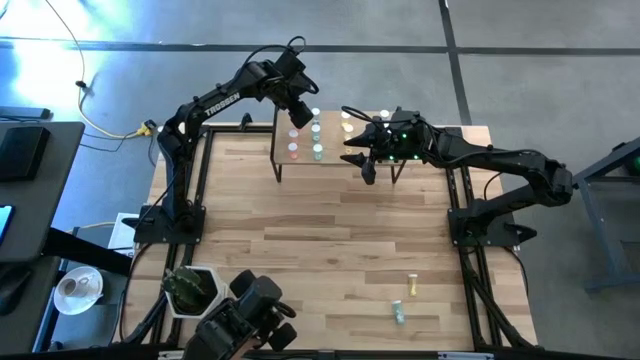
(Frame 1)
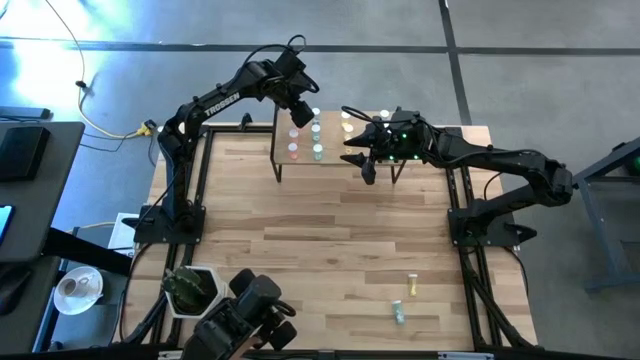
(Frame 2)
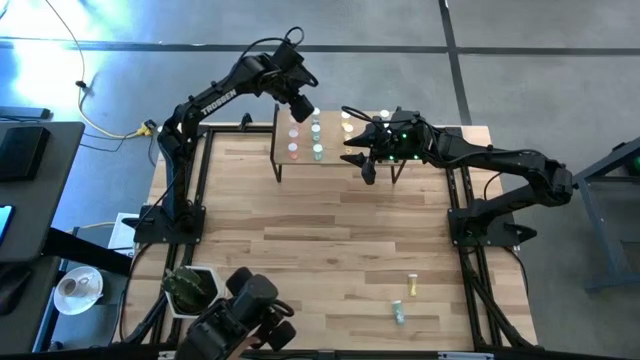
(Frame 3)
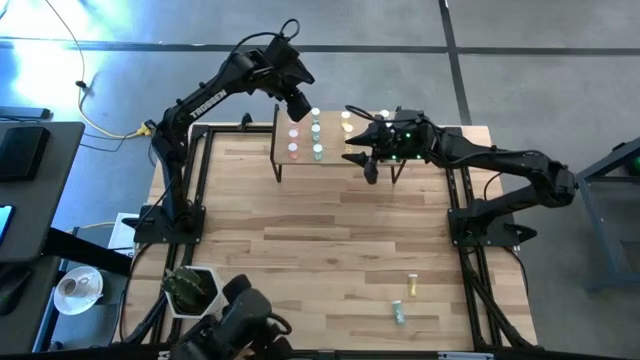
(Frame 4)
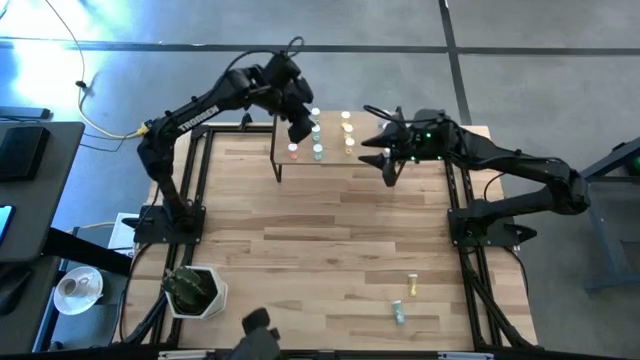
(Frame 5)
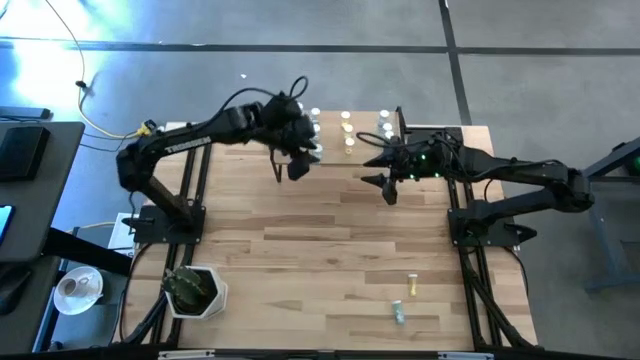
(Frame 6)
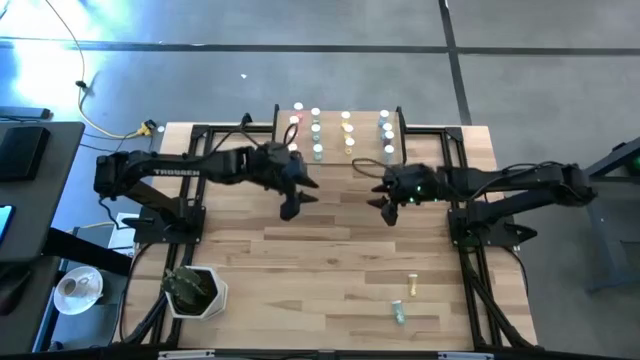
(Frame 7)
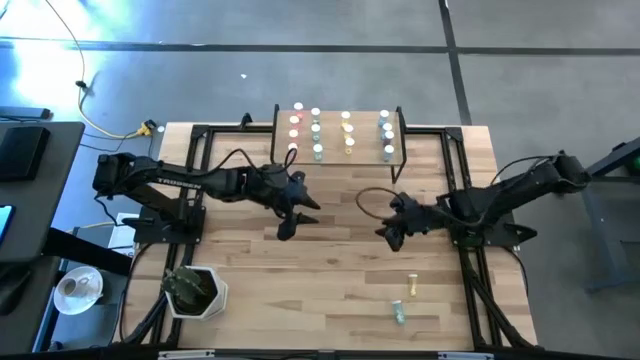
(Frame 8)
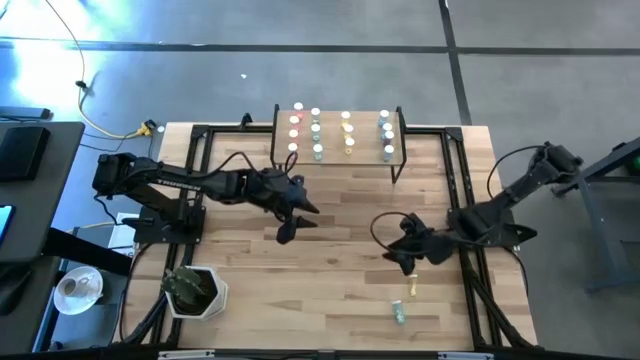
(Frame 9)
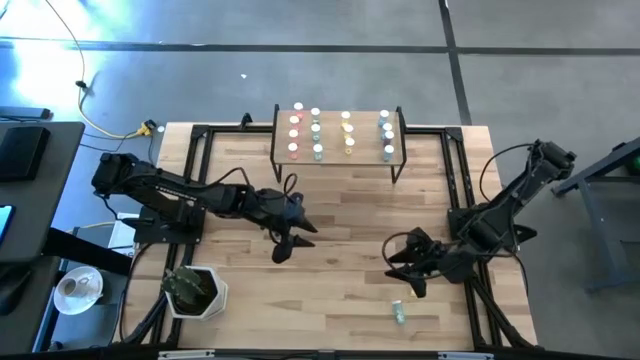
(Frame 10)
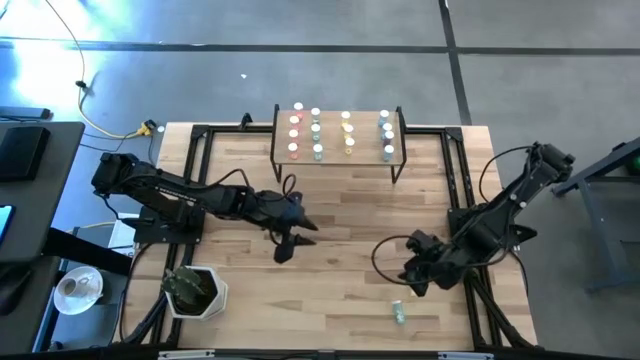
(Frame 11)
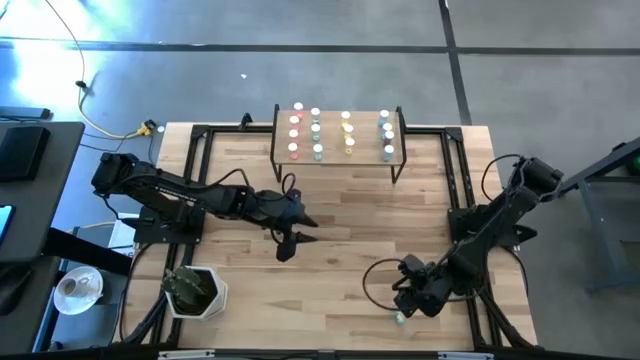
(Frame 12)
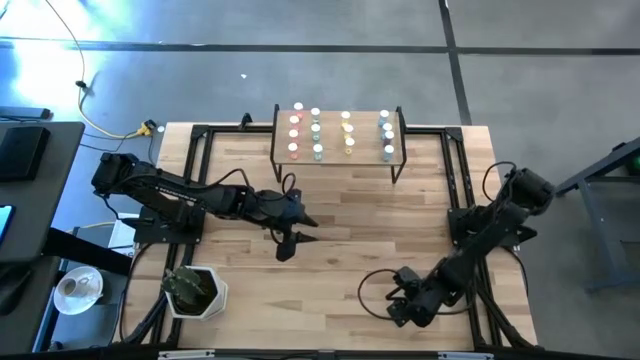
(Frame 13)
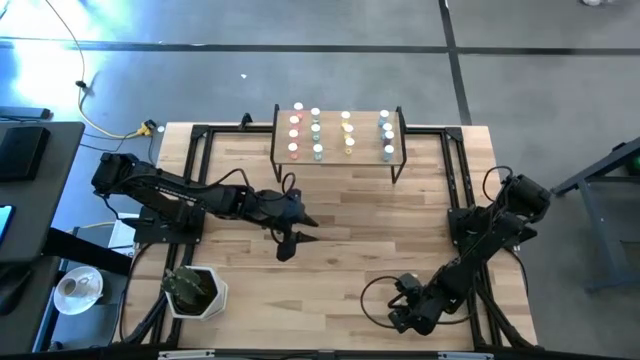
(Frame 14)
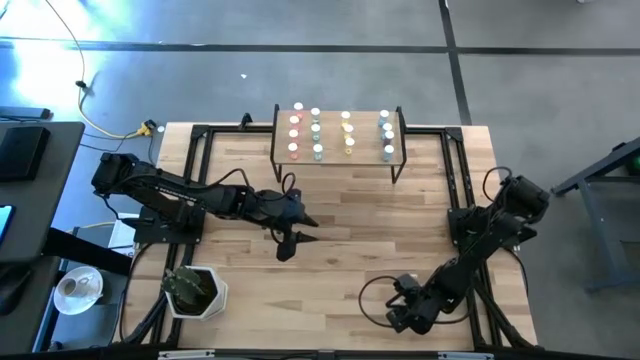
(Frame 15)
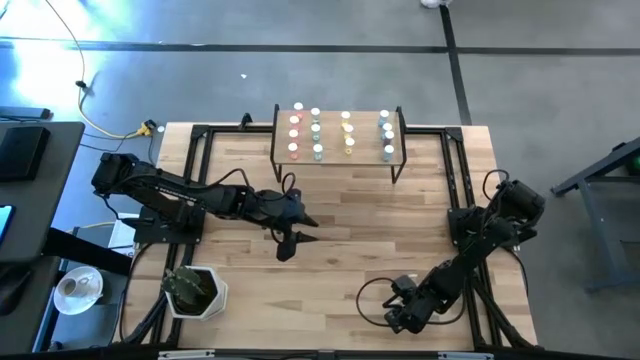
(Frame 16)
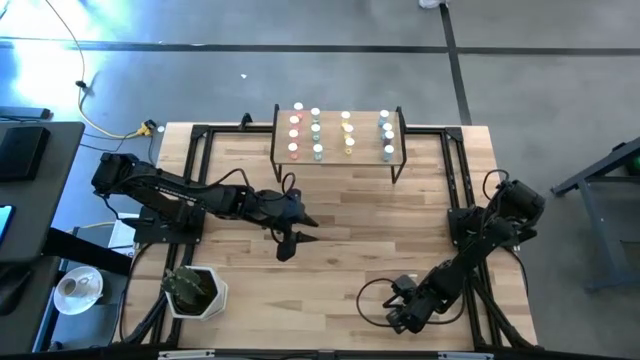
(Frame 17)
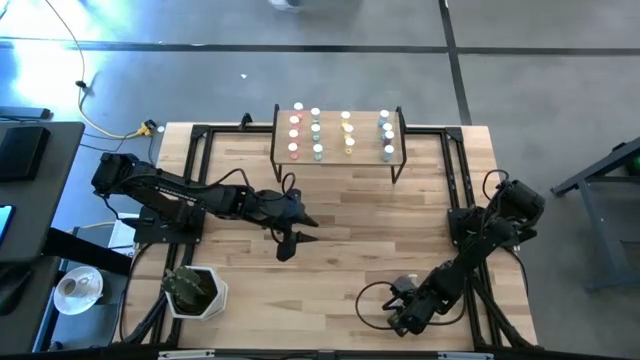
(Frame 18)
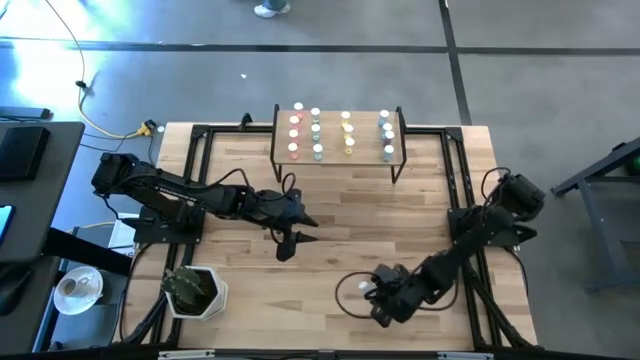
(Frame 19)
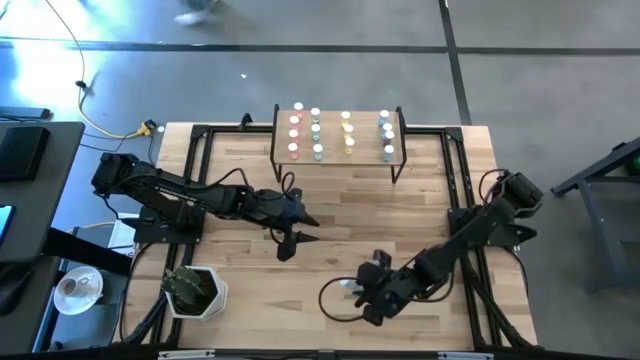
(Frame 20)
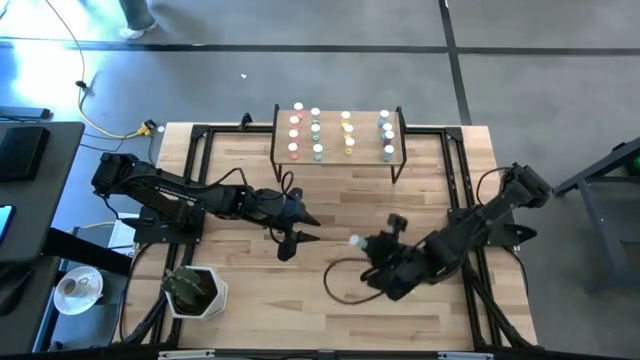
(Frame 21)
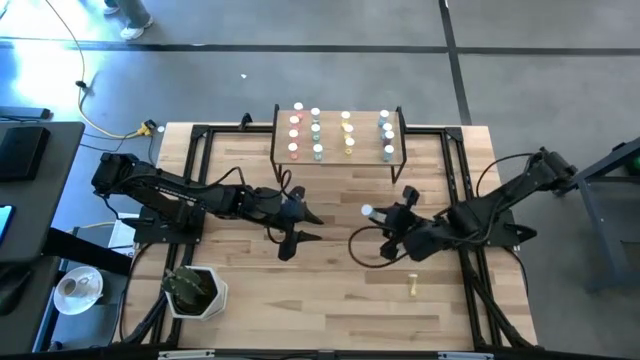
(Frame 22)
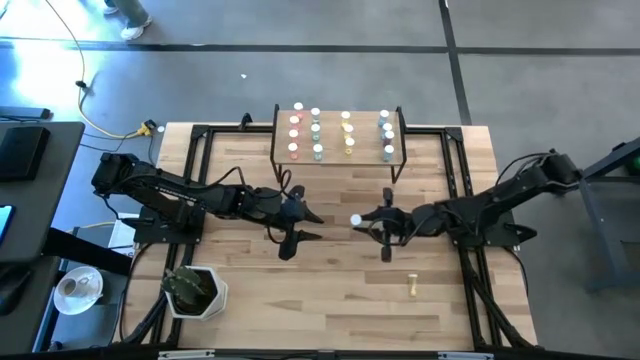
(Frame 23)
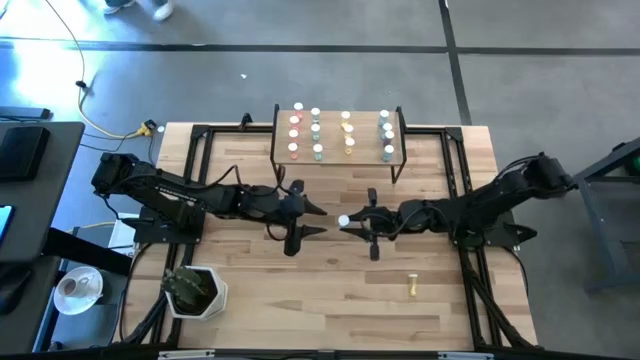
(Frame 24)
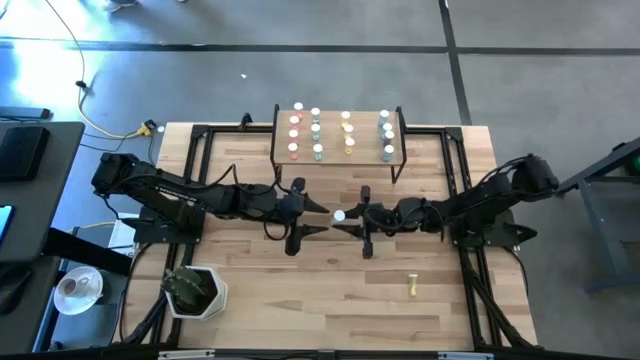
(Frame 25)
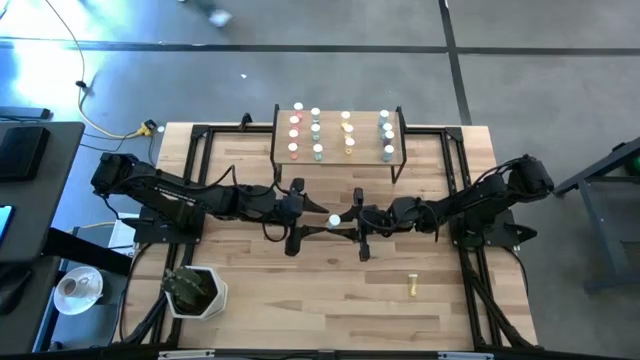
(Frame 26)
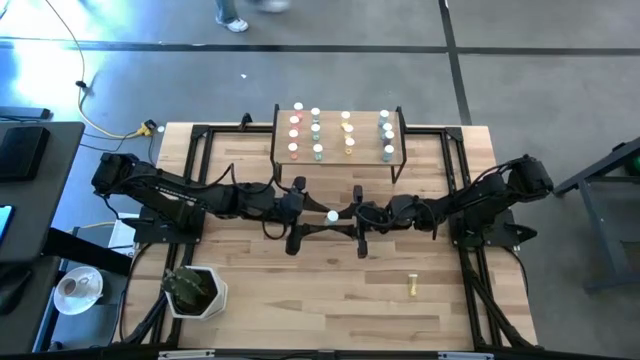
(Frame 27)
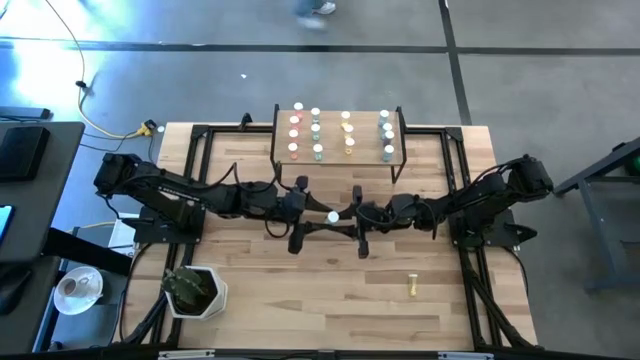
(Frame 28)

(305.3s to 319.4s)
Task: Pick and place medicine bottles onto shelf by color
Put the light blue medicine bottle on the shelf

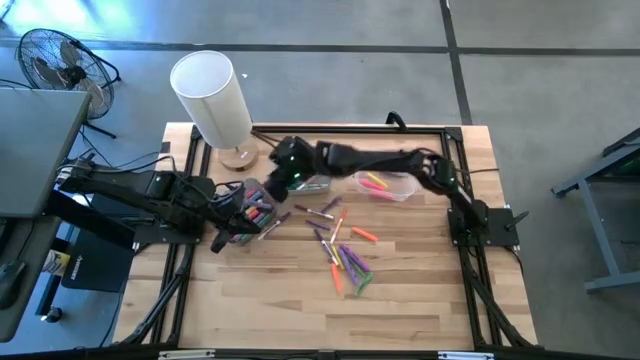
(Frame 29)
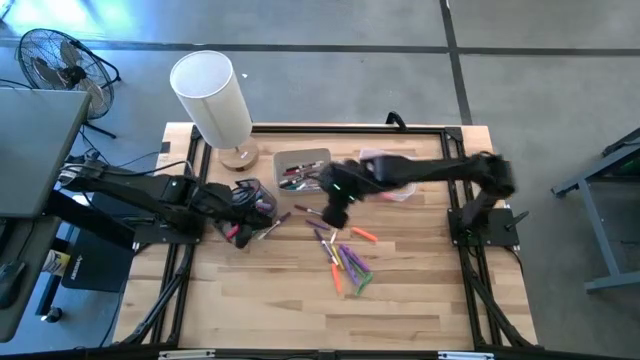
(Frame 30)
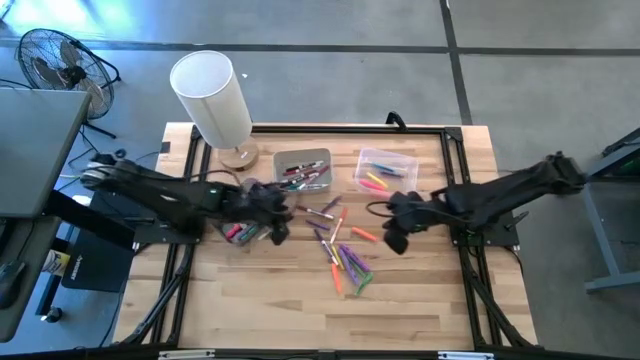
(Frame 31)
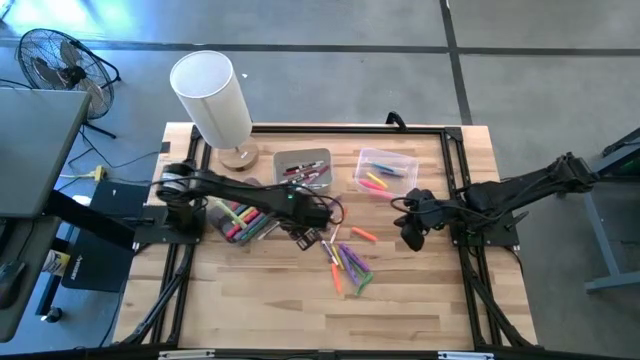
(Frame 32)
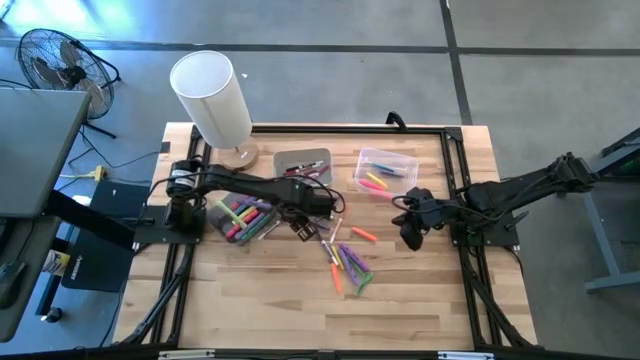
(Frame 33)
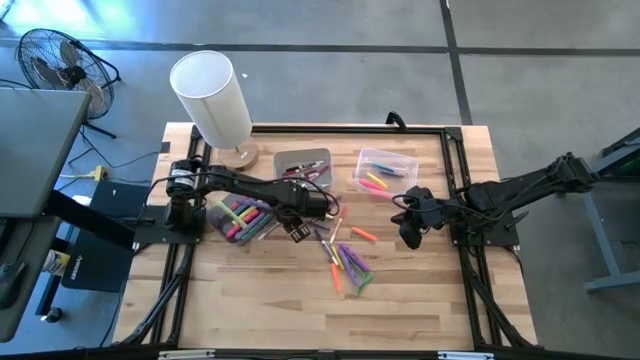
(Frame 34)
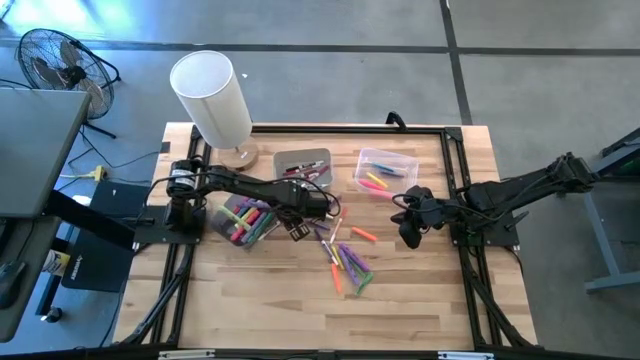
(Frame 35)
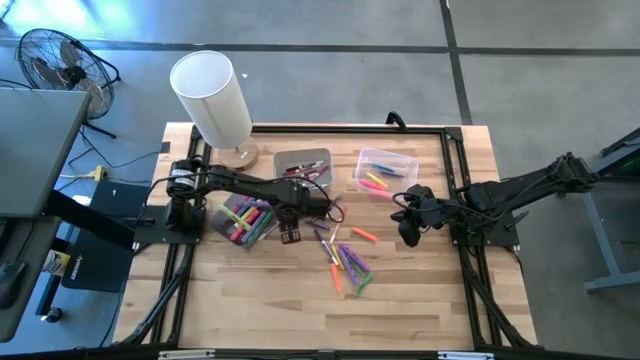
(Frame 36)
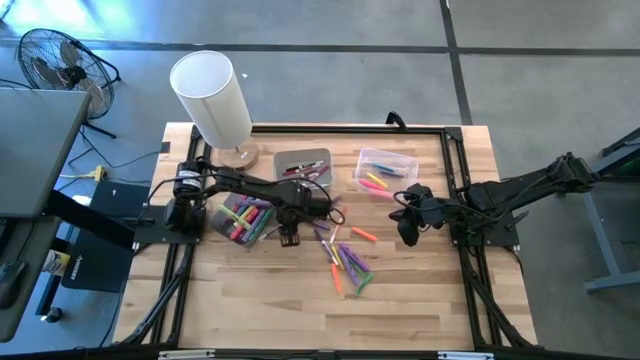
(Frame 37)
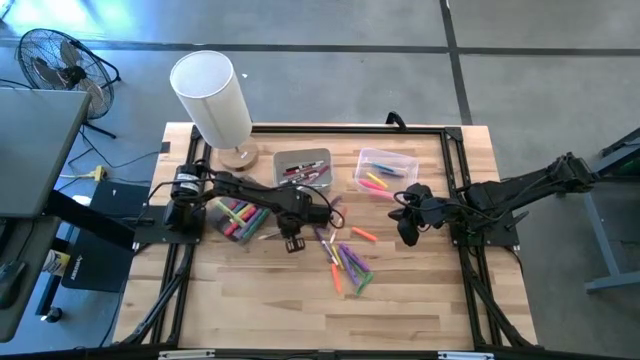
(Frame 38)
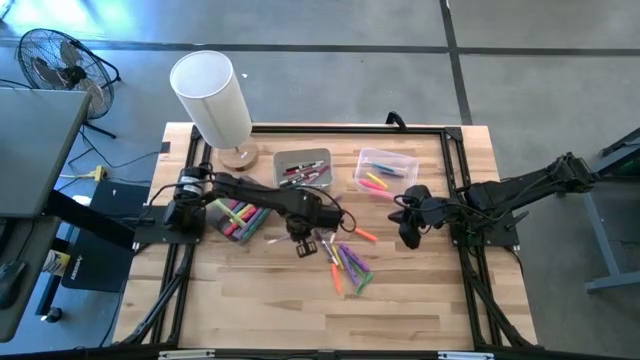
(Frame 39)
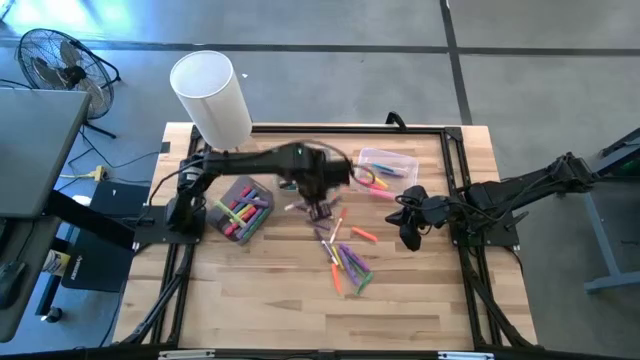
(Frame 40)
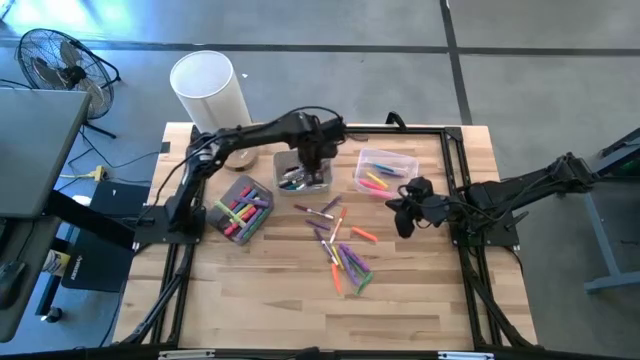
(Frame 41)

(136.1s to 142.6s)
Task: Pick & Place Markers
Put the blue marker pen into the white bin
